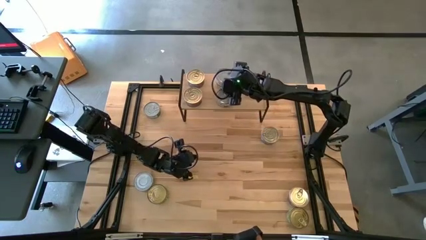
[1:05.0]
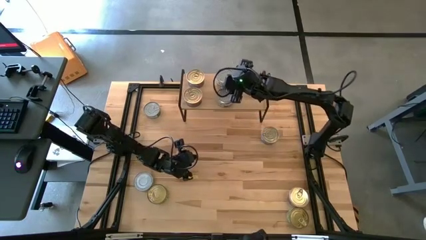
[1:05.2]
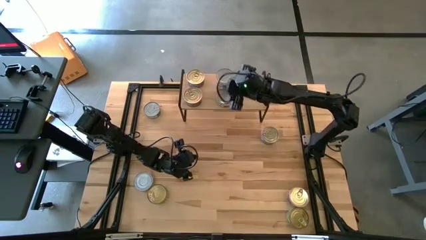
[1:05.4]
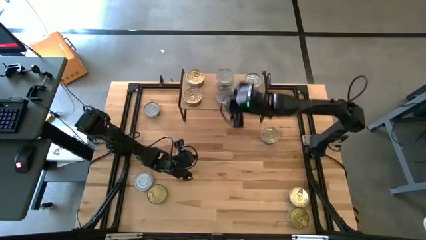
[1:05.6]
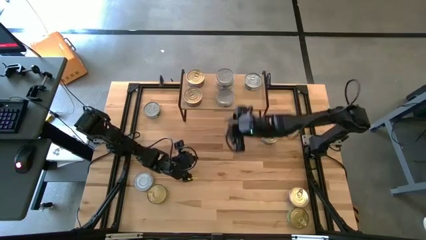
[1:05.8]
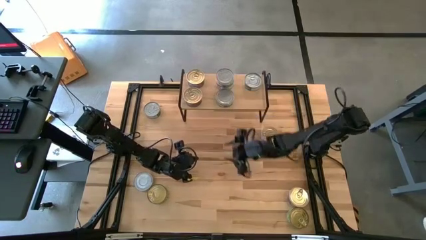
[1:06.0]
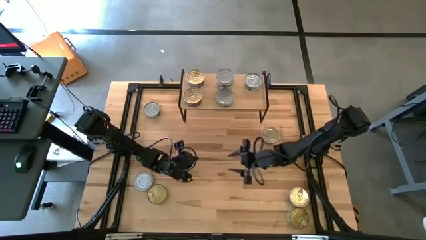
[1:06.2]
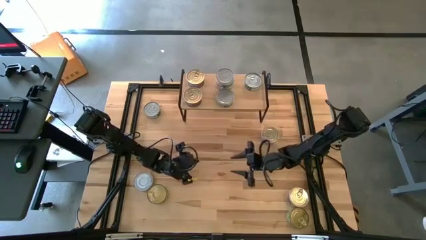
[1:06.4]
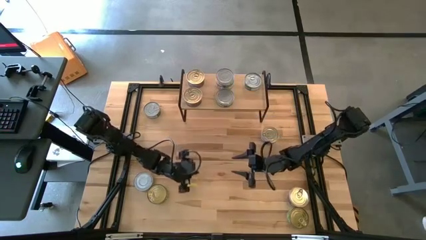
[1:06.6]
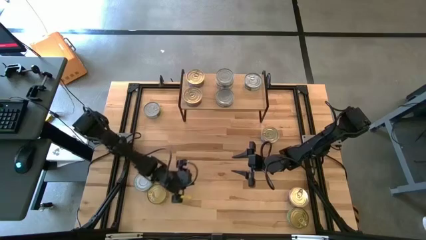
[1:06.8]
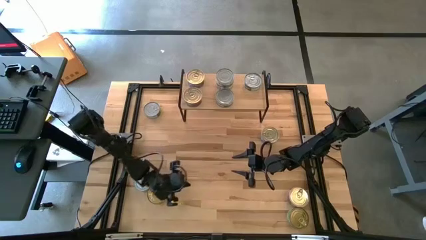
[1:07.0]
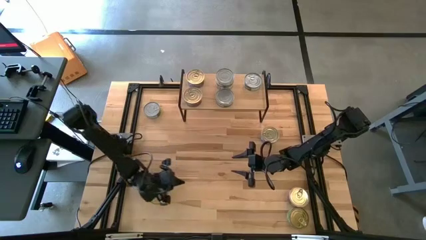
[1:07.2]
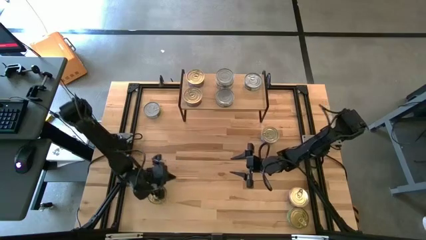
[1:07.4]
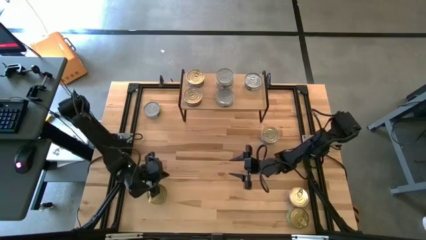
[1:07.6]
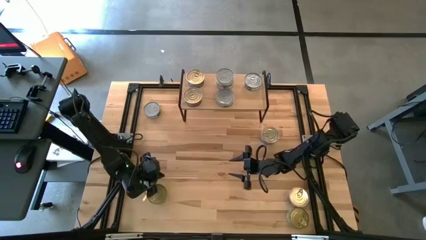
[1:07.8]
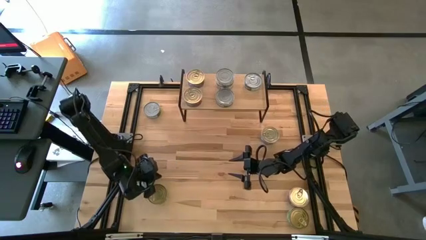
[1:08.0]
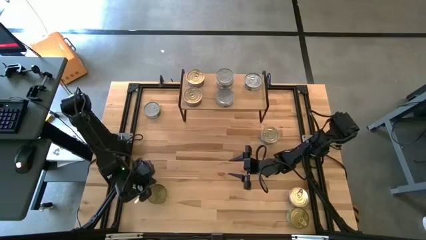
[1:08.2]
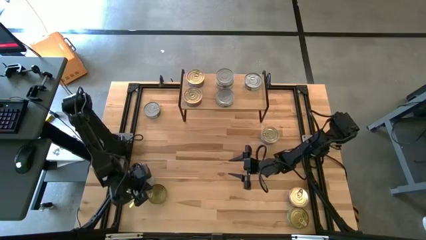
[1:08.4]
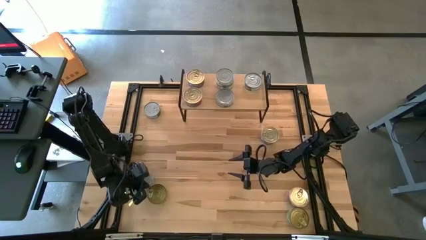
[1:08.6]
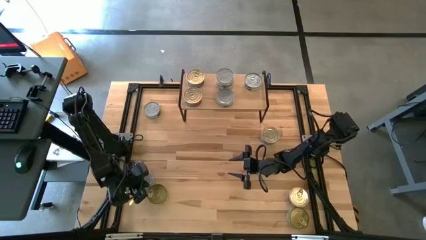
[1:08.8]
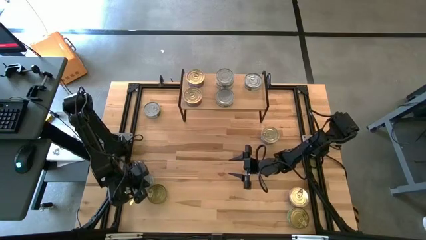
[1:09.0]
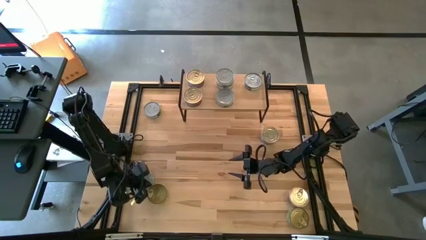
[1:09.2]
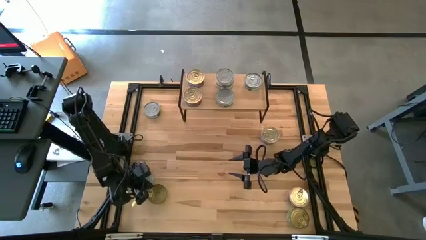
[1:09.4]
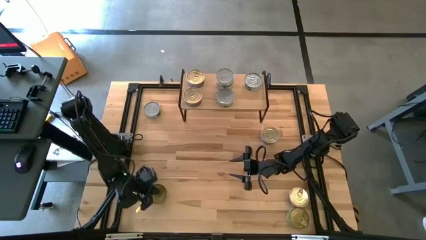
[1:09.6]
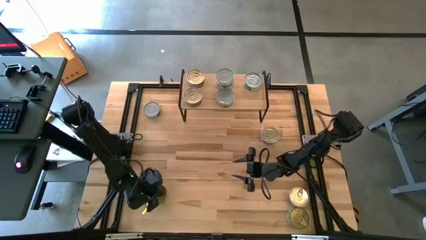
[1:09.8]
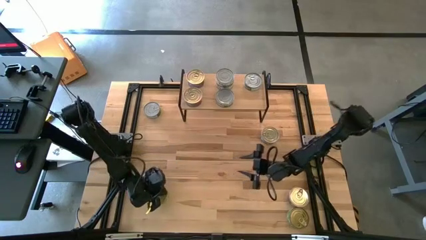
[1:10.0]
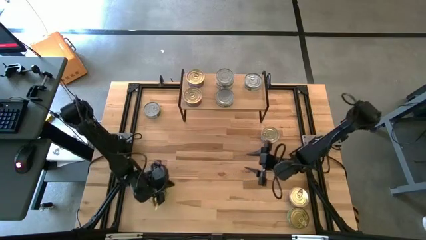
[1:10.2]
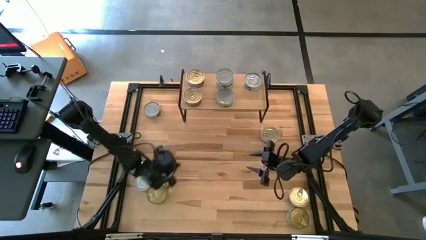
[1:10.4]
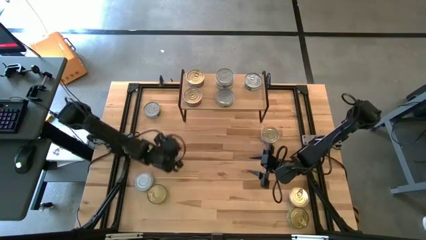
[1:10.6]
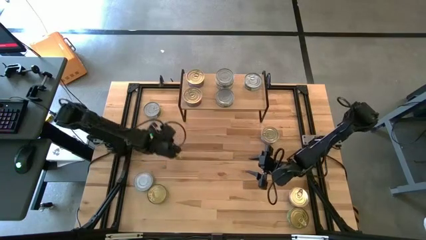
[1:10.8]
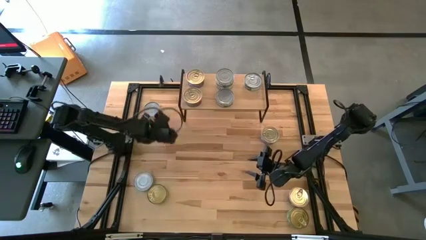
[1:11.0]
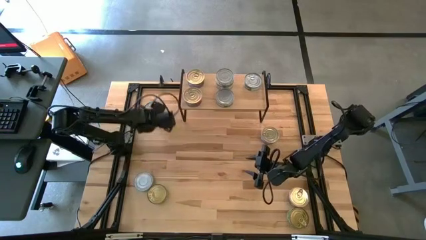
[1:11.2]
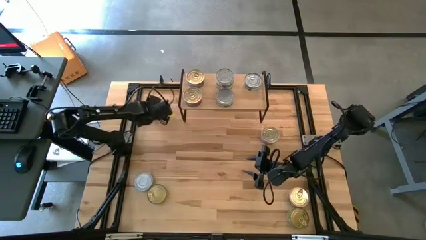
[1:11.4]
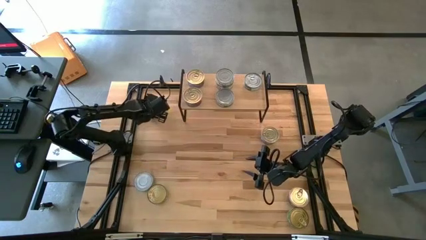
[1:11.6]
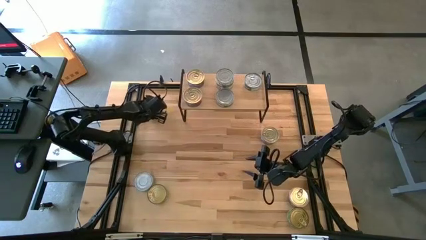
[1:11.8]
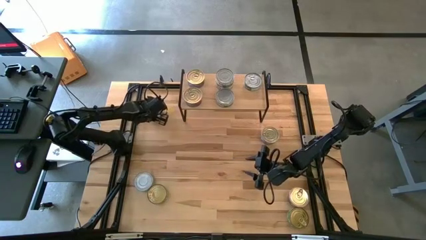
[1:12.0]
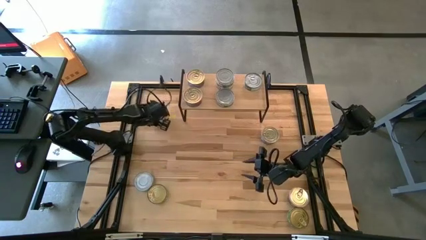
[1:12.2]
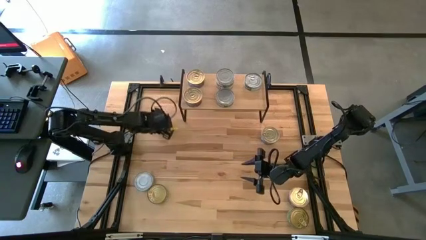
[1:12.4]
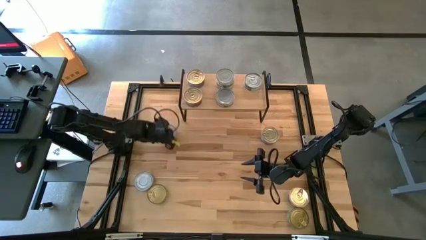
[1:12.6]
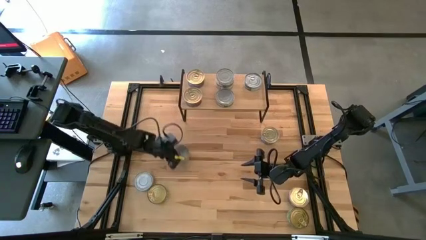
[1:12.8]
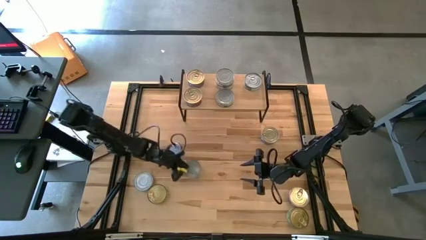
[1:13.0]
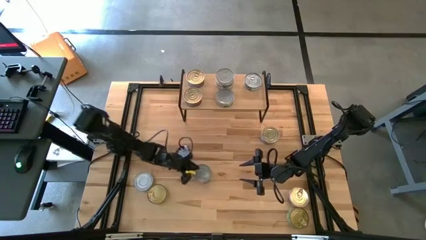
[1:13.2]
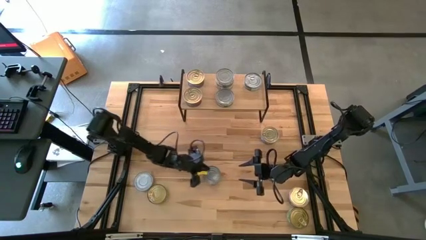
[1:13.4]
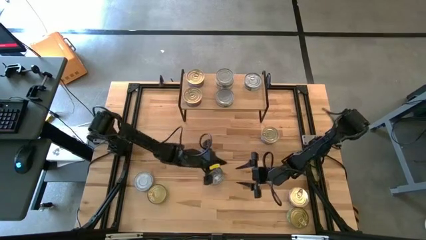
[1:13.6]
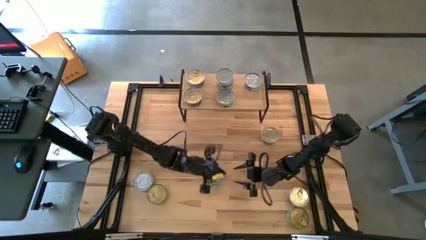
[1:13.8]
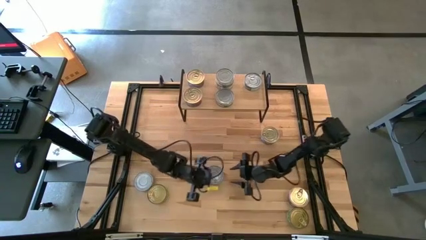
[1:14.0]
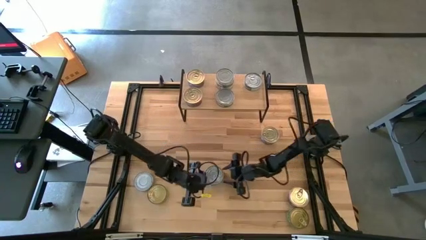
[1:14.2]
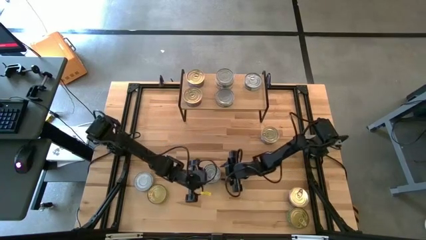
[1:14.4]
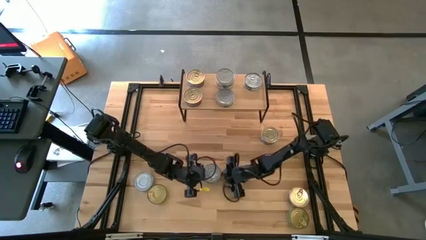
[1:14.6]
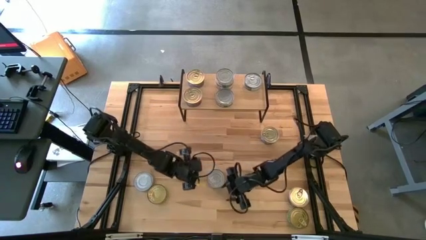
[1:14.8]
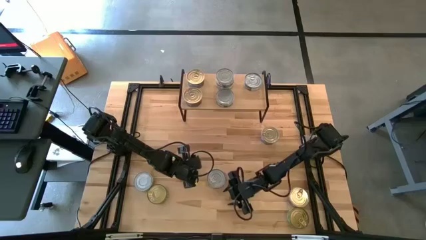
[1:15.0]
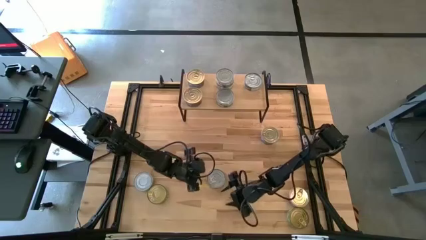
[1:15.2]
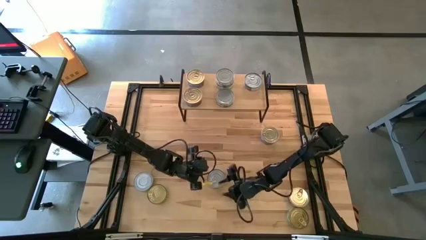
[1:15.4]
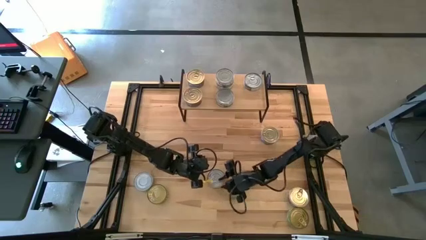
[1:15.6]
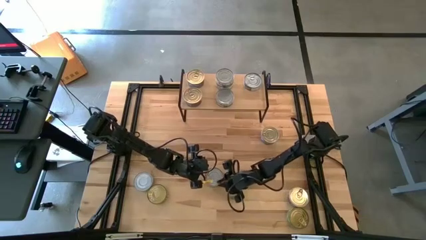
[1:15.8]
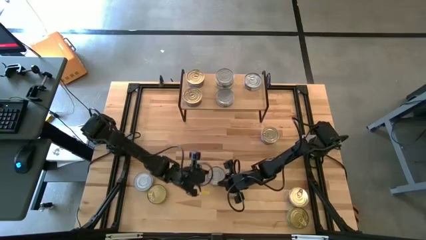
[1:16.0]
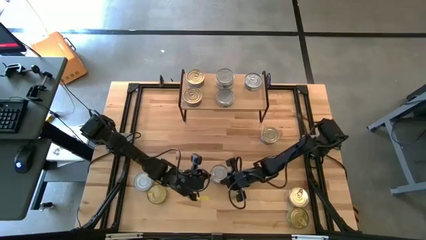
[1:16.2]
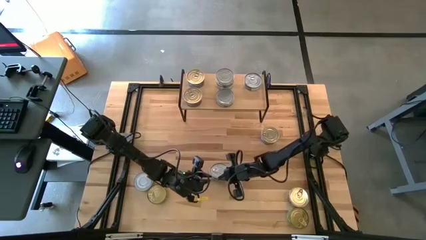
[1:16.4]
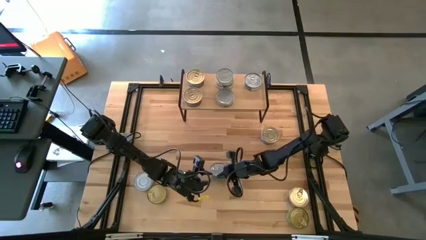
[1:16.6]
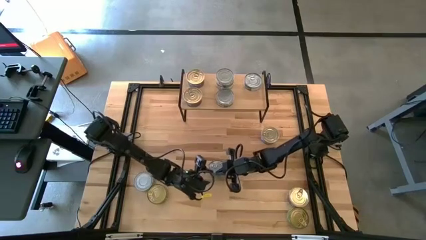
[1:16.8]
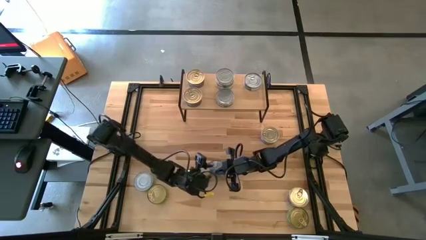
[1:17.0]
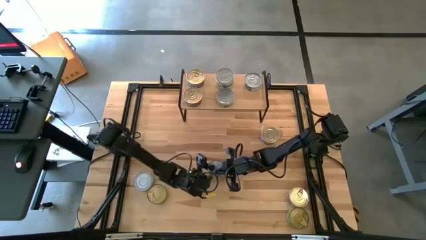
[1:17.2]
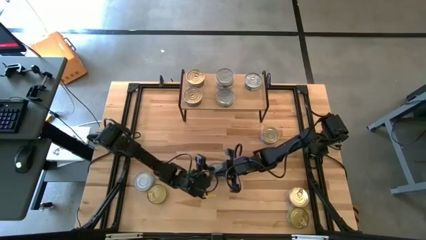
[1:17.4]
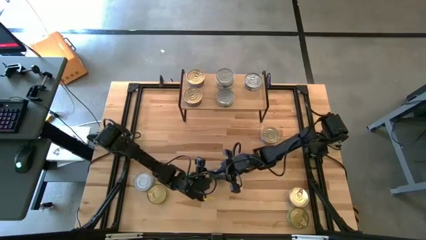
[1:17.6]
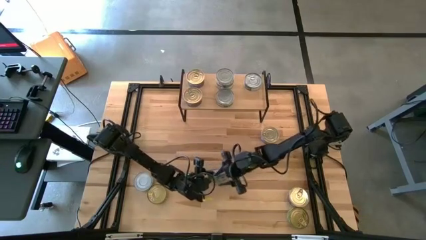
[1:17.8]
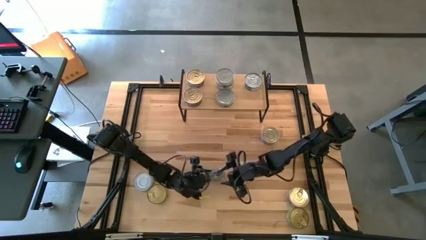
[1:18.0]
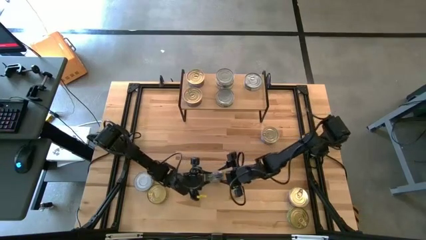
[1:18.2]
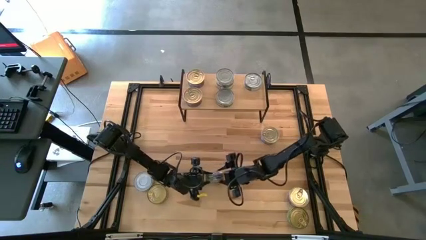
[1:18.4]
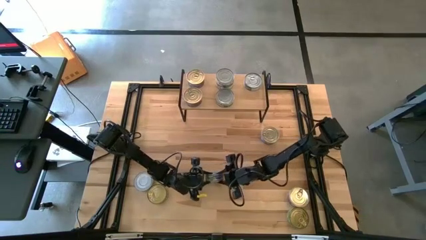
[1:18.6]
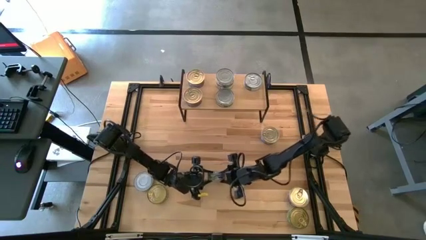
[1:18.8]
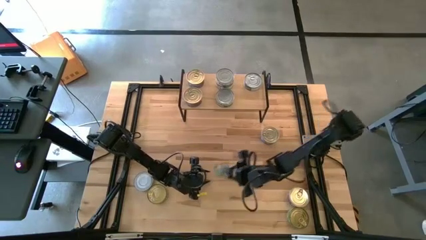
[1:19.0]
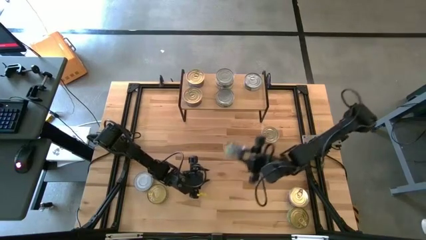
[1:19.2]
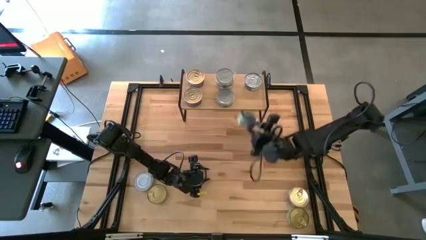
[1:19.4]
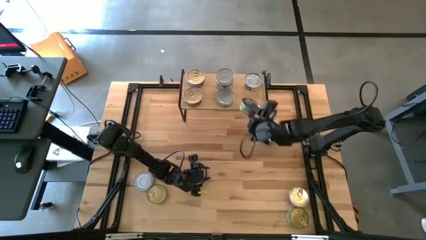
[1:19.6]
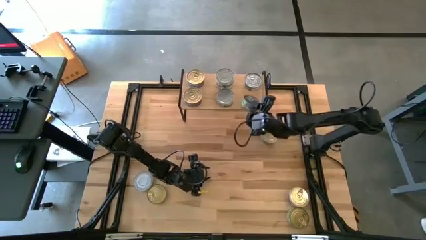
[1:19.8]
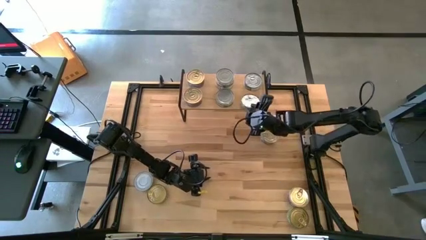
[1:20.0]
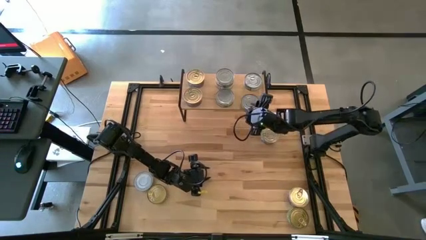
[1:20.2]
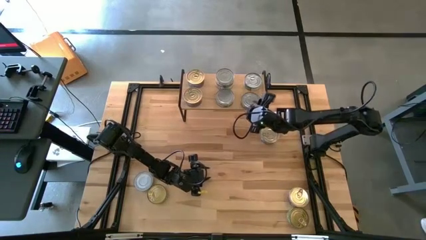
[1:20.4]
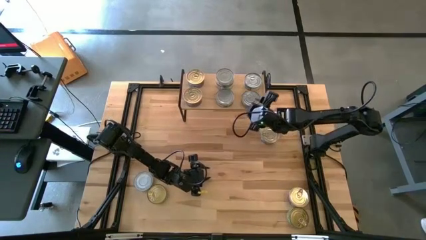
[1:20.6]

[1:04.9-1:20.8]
Task: Stack canned seafood by type on shelf
Put the green tuna can aligned with the other green tuna can on the shelf

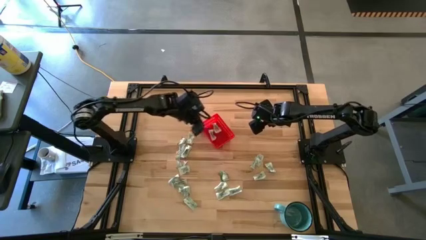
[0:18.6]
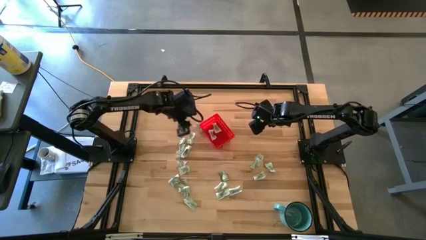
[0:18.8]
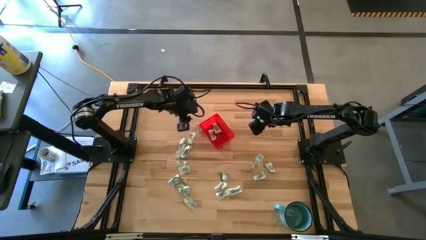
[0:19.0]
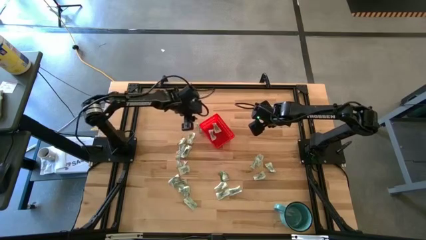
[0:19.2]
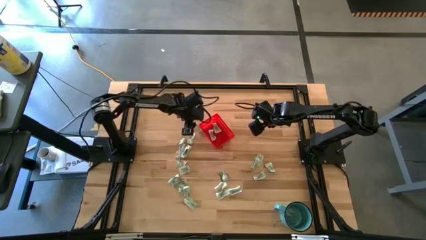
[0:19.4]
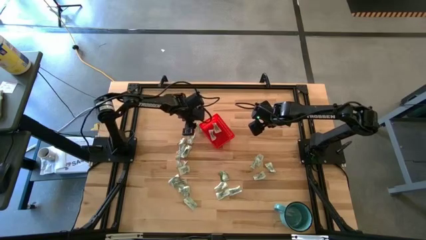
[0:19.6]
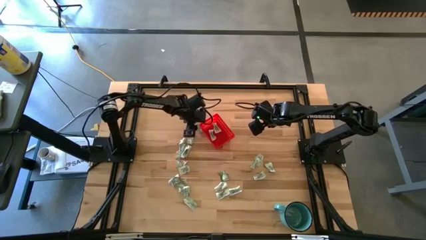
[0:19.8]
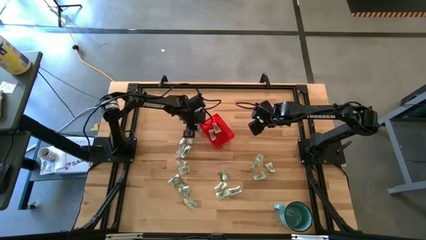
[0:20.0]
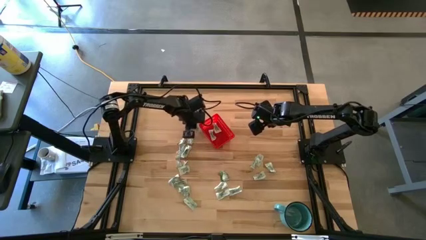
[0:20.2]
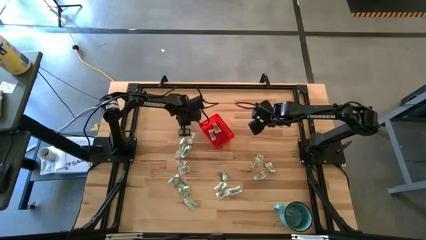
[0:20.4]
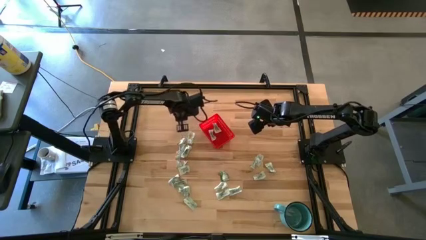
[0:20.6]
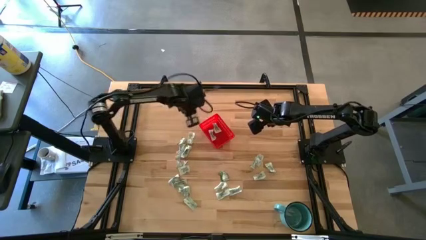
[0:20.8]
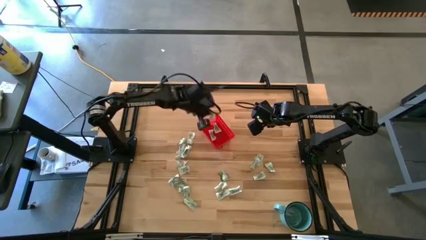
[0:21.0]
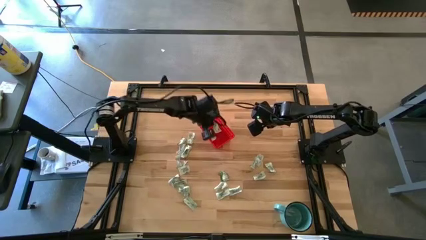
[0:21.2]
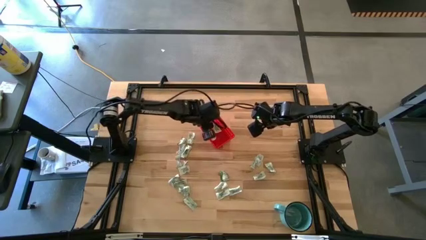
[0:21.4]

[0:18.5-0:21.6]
Task: Pick and place Stevia / Truvia into bins
Put the stevia packet into the red basket
